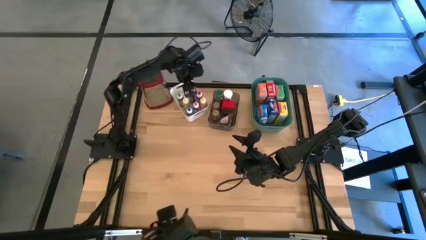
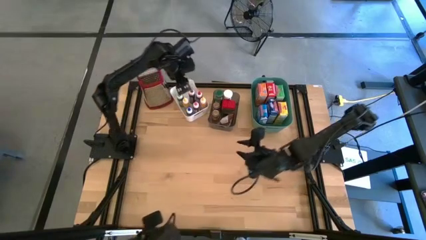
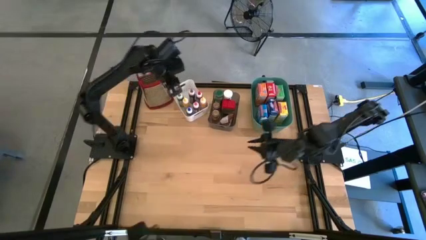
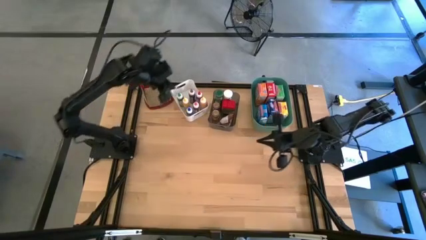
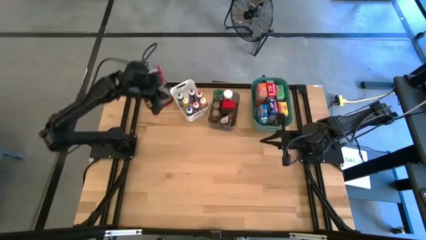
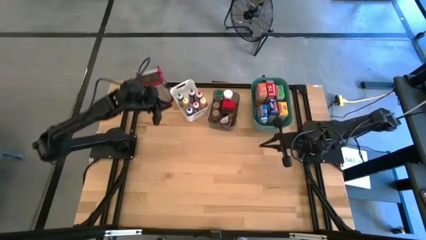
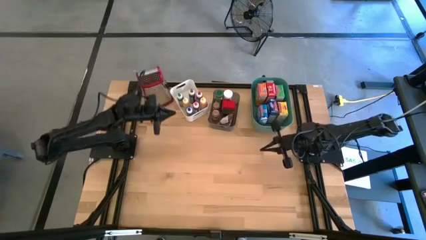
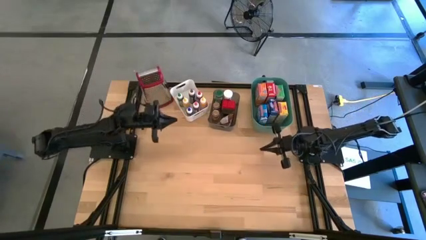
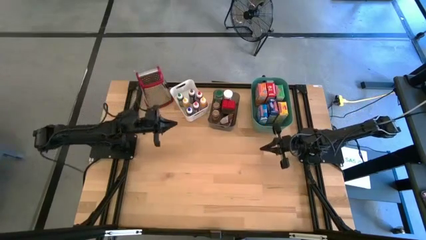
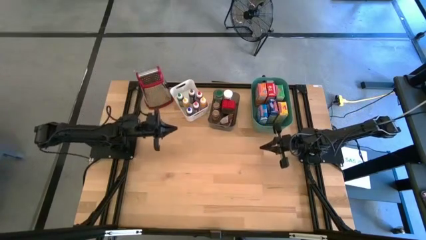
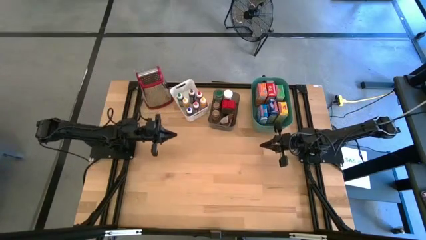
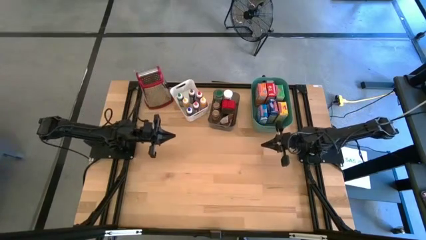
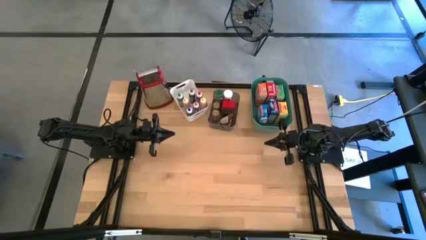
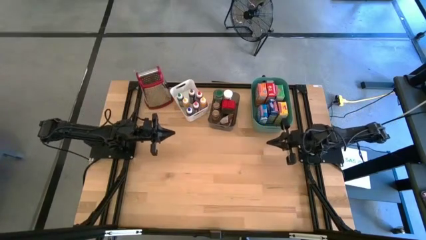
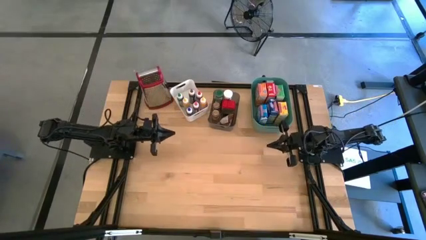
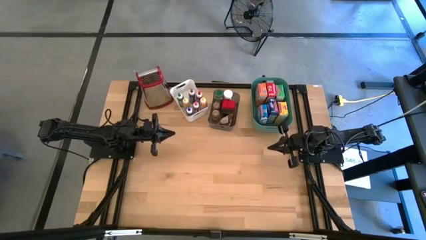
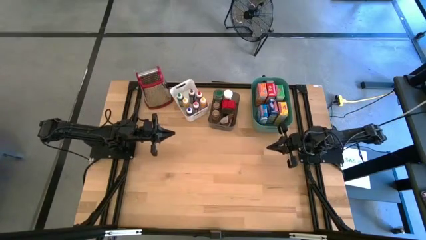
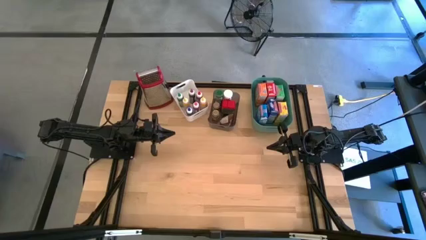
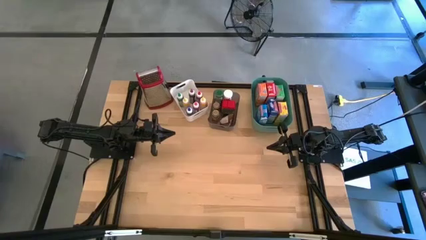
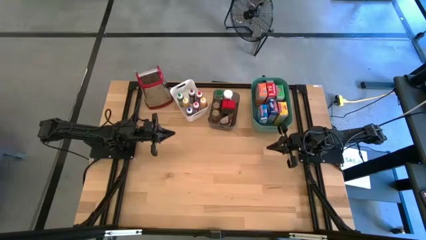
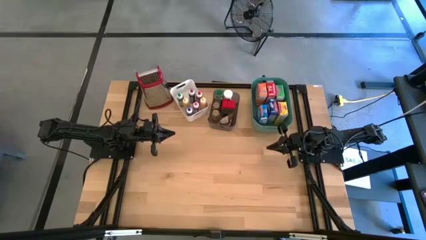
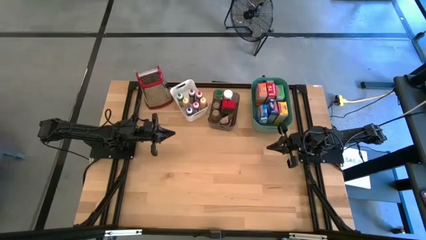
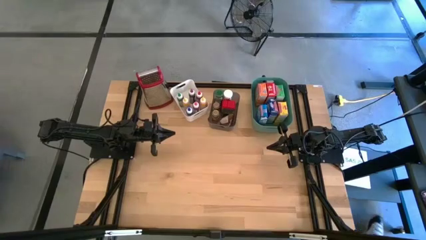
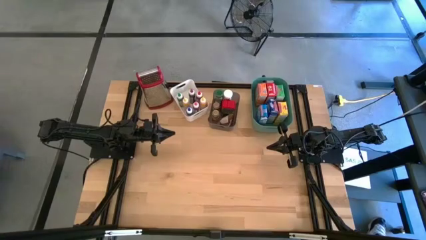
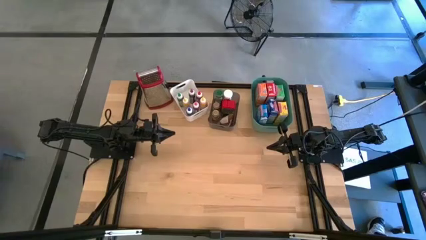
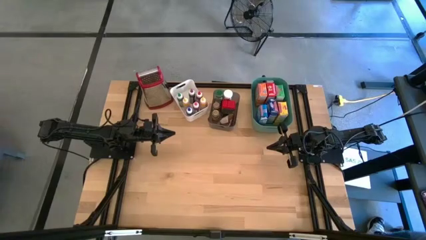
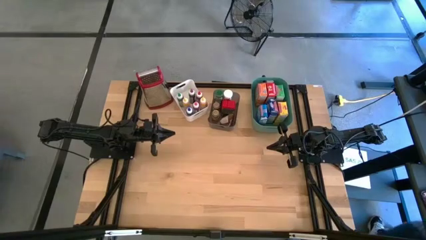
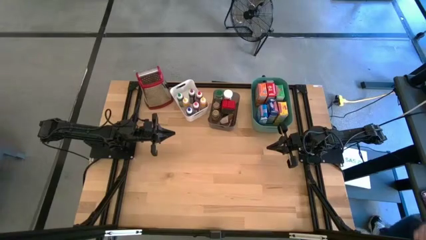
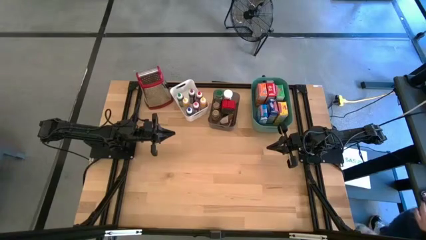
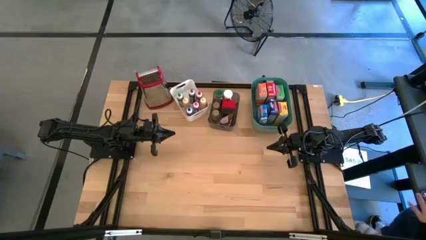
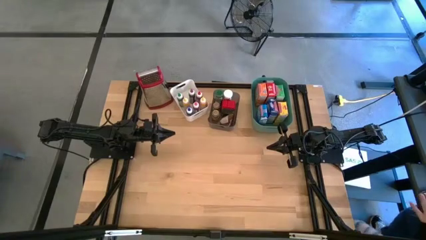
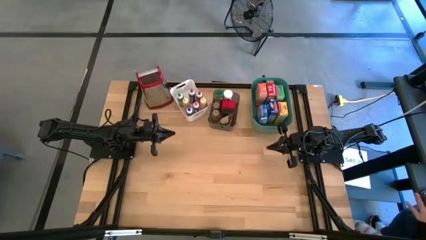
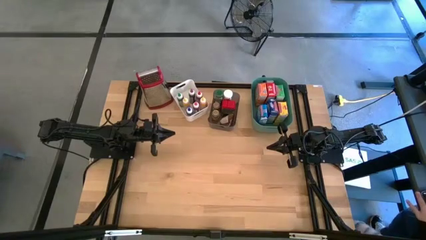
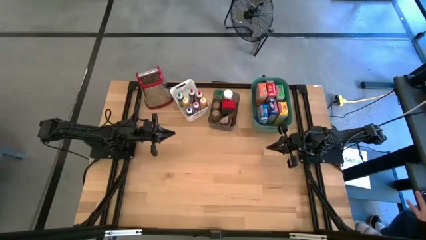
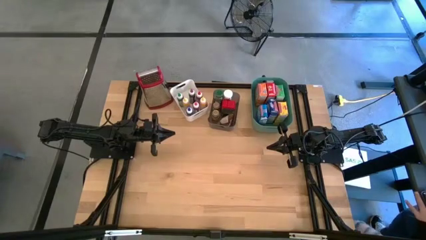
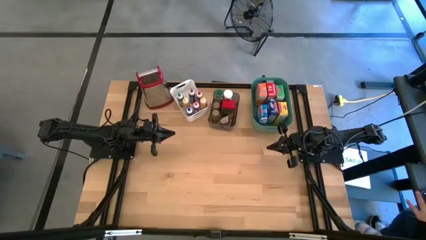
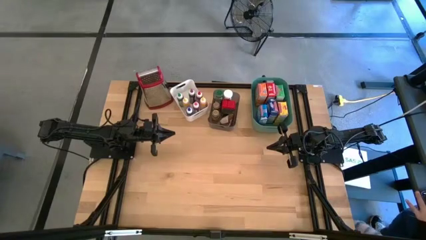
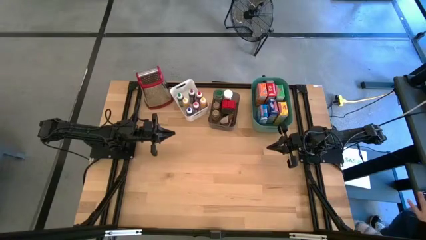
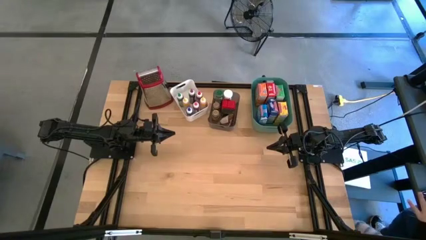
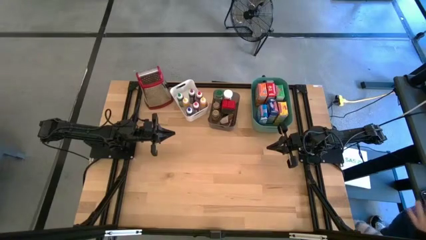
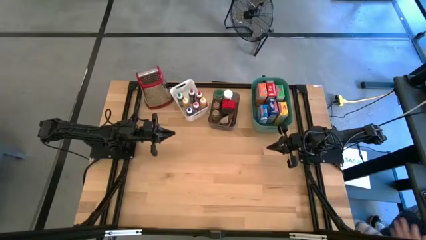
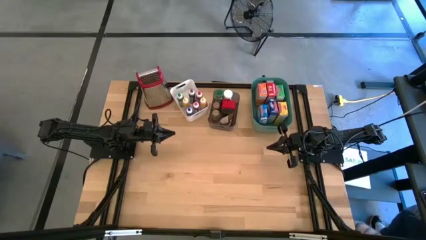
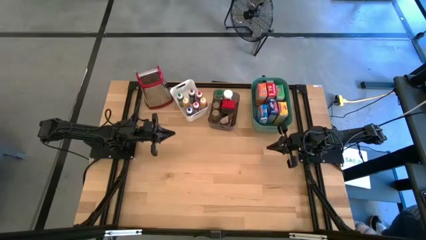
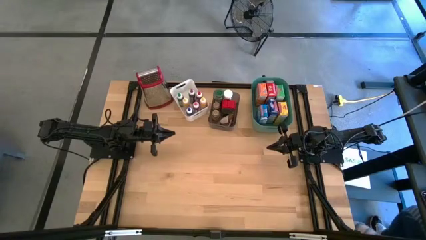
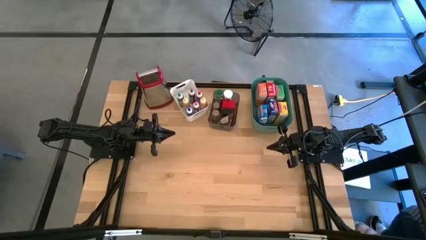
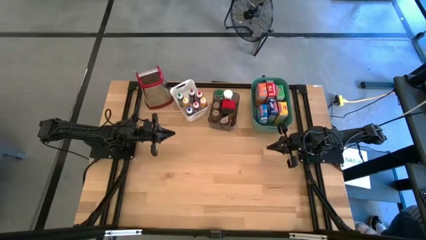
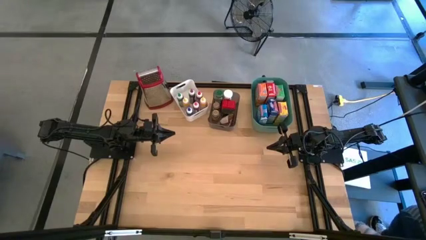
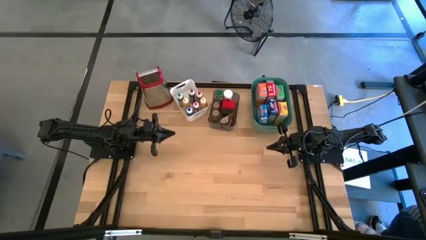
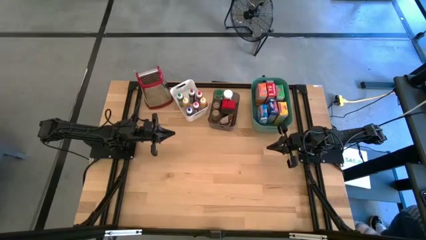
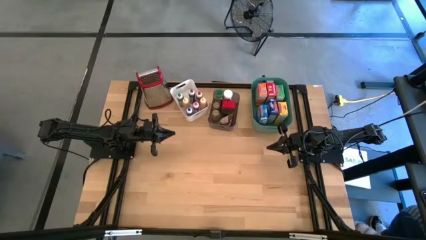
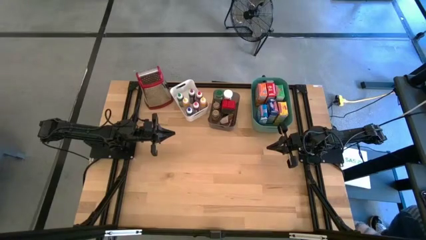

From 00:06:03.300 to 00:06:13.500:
Task: Pick & Place Kitchen Items
Return to Home Position

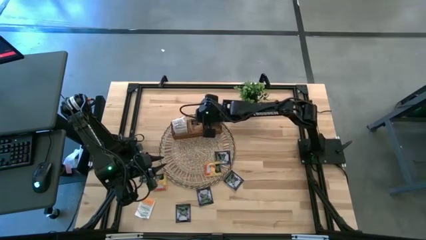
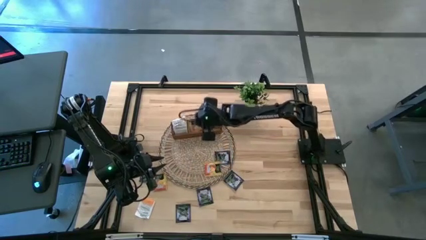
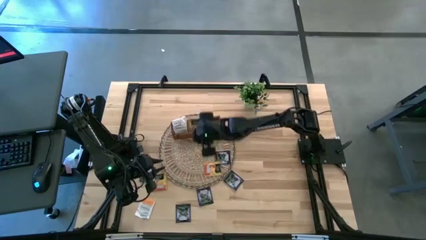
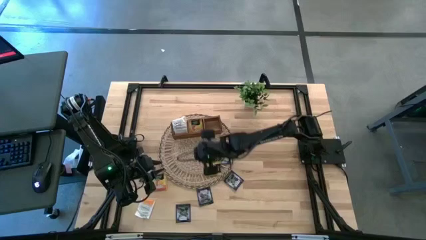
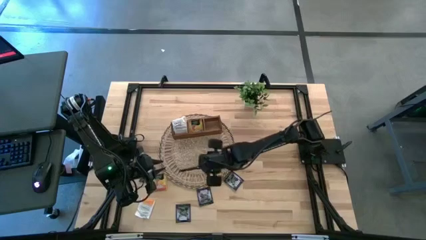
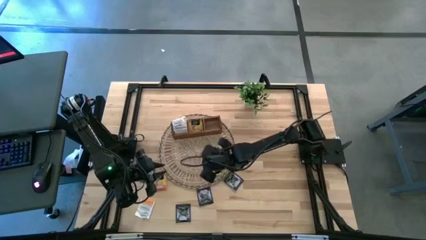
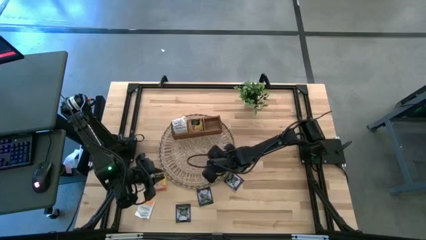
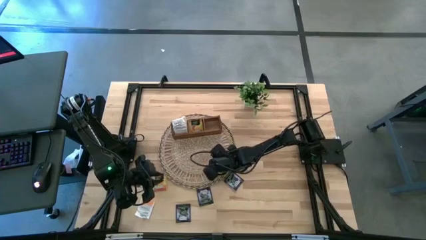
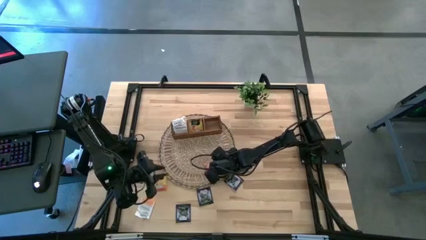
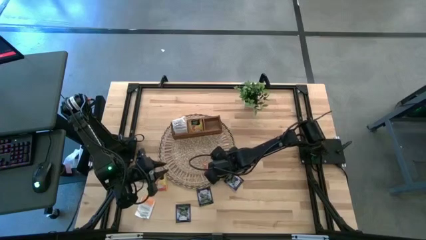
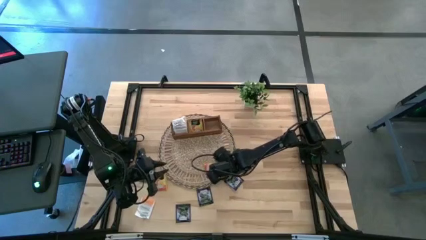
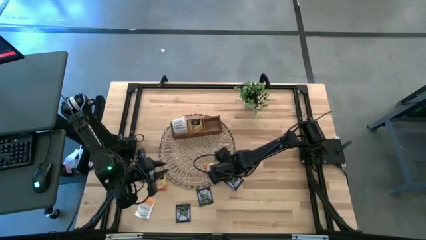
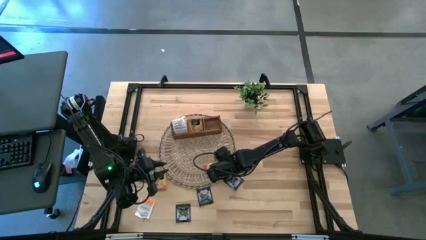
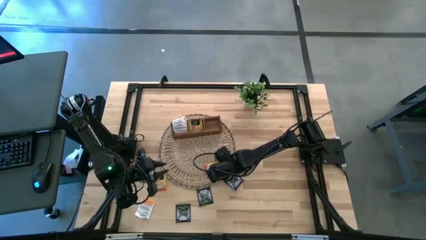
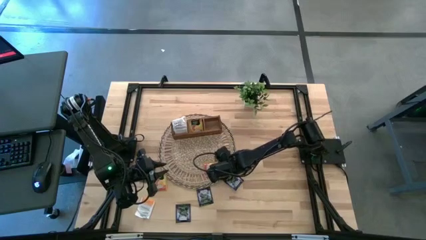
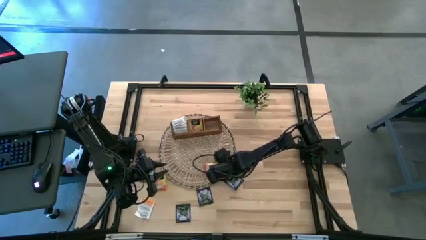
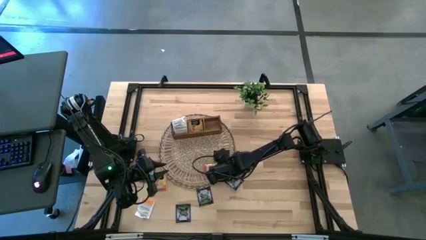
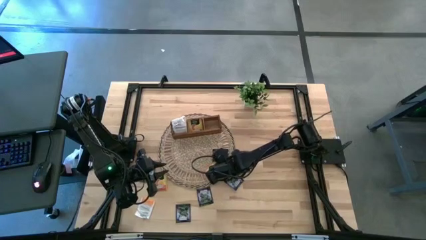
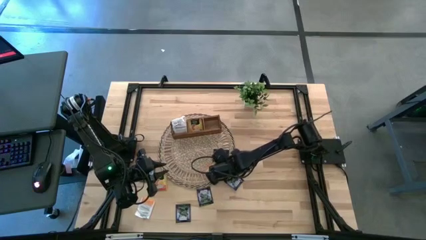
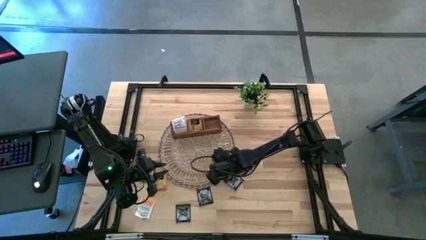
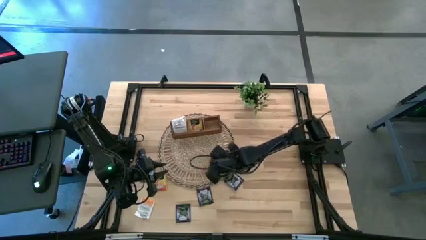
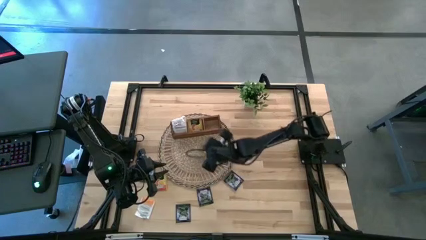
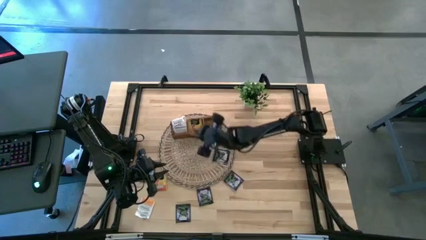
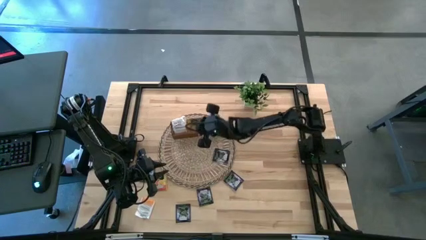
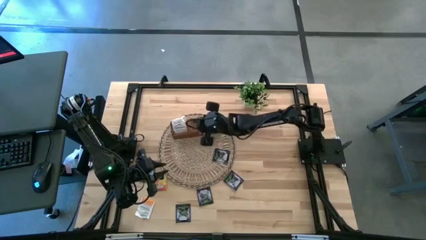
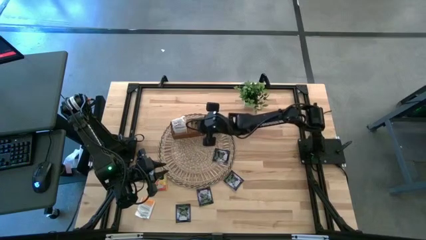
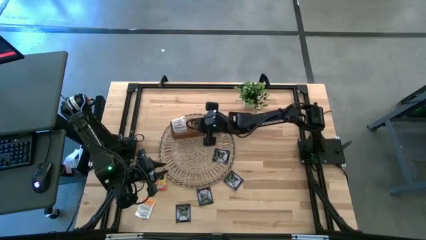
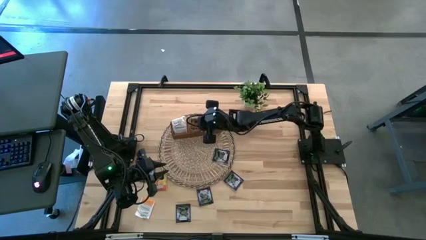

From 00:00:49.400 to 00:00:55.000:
Task: Pick & Place Tea
Put the orange tea packet into the middle compartment of the wooden organizer
